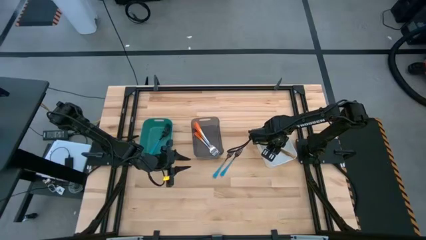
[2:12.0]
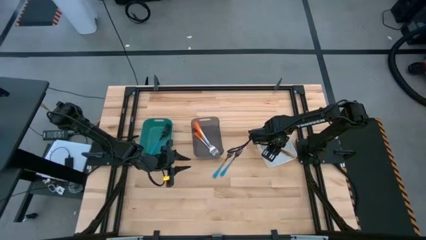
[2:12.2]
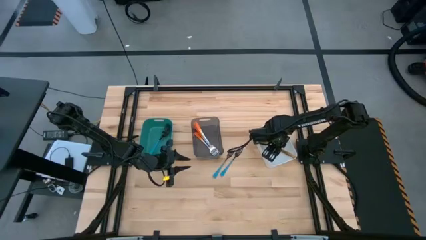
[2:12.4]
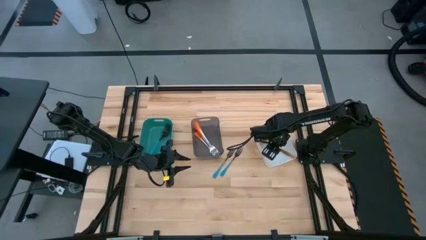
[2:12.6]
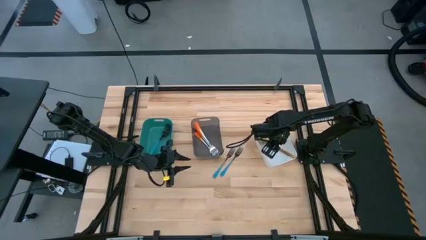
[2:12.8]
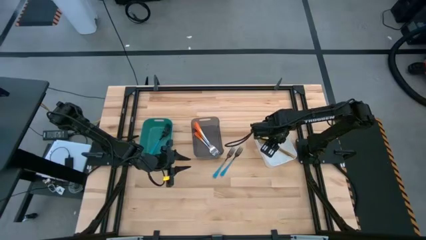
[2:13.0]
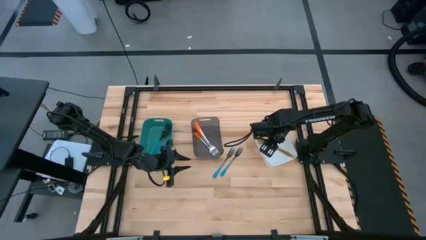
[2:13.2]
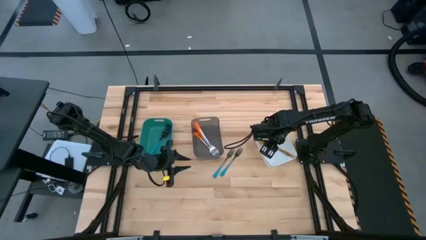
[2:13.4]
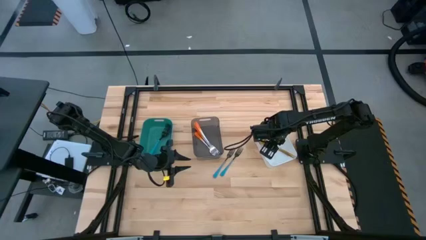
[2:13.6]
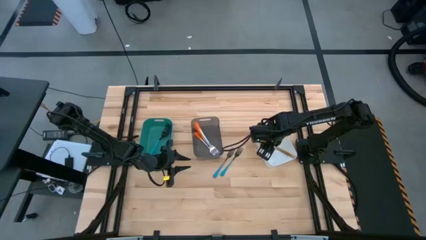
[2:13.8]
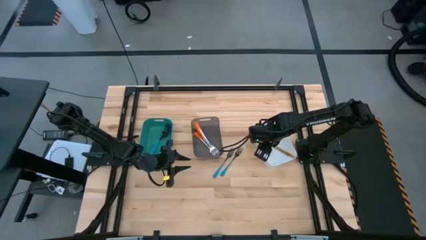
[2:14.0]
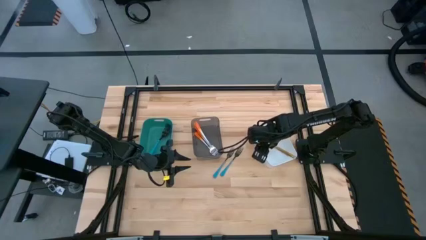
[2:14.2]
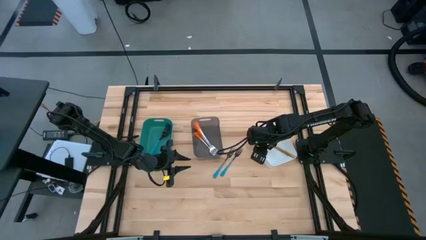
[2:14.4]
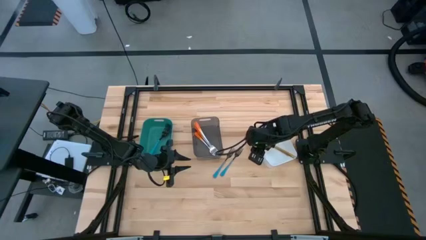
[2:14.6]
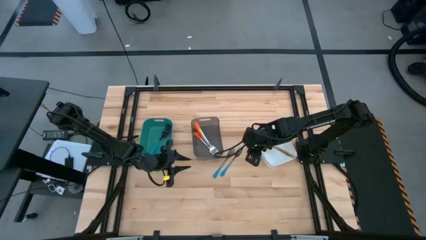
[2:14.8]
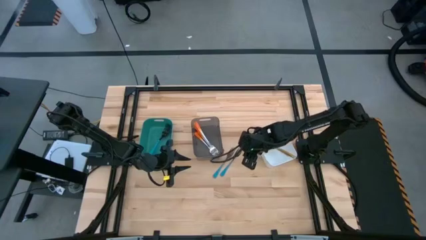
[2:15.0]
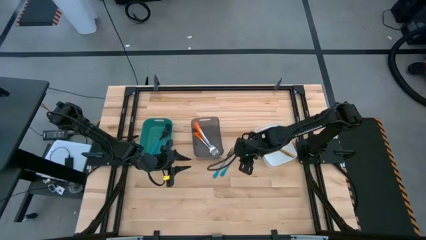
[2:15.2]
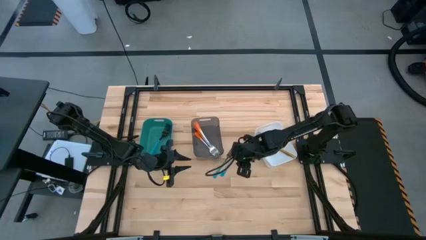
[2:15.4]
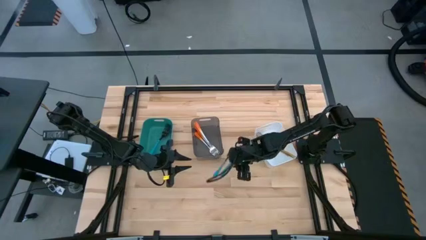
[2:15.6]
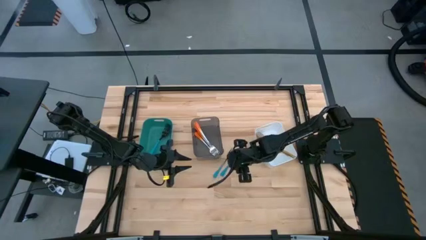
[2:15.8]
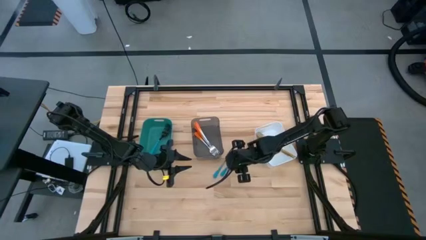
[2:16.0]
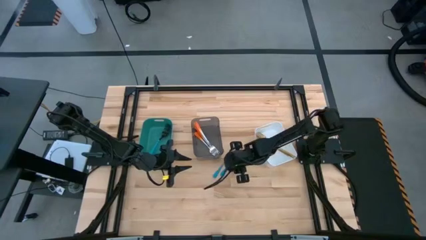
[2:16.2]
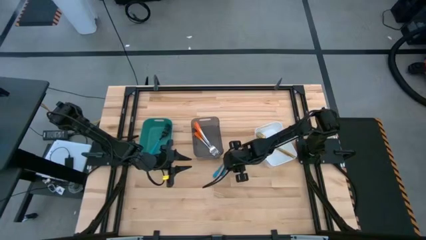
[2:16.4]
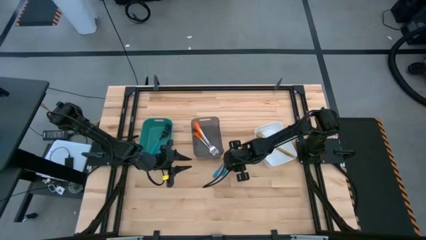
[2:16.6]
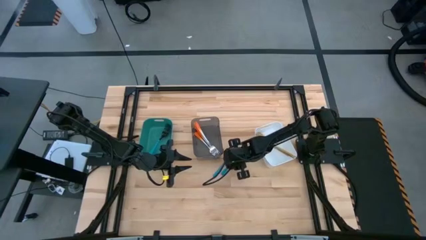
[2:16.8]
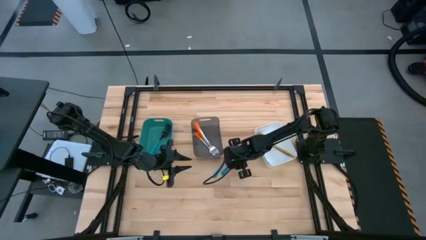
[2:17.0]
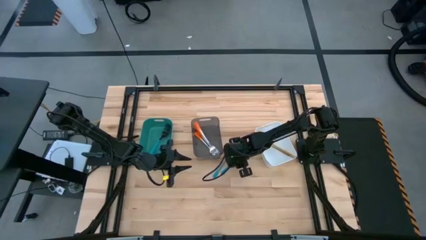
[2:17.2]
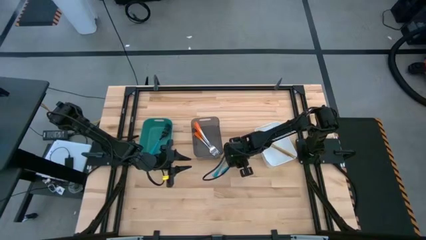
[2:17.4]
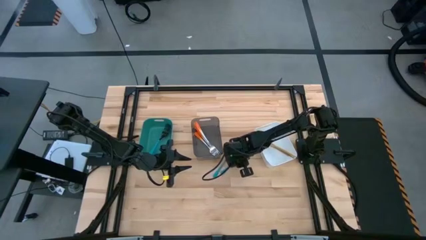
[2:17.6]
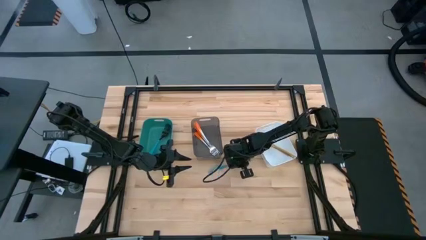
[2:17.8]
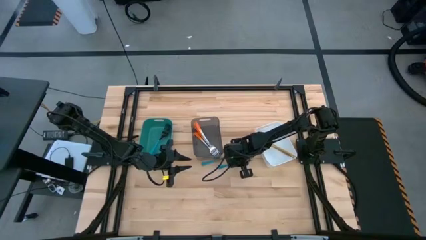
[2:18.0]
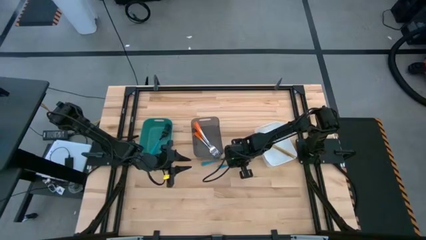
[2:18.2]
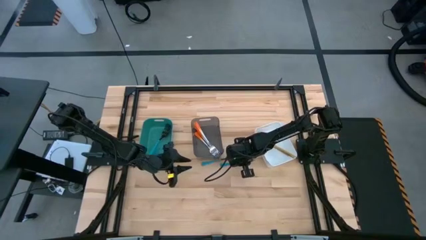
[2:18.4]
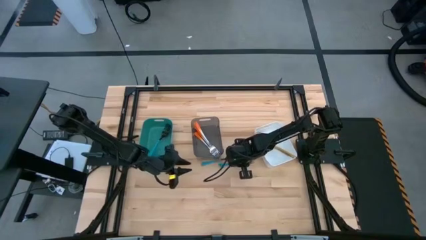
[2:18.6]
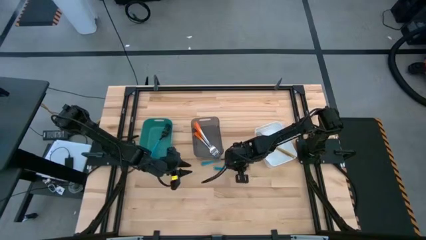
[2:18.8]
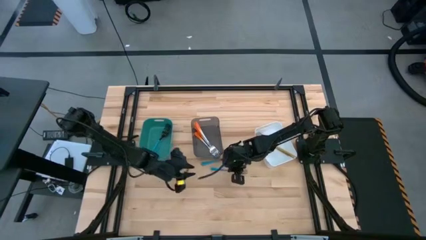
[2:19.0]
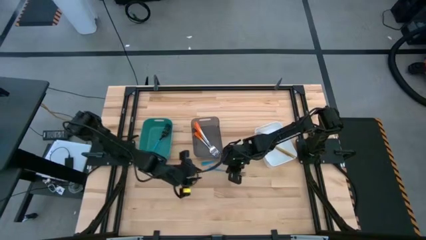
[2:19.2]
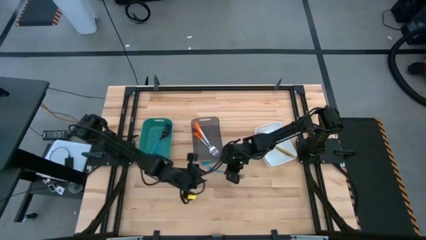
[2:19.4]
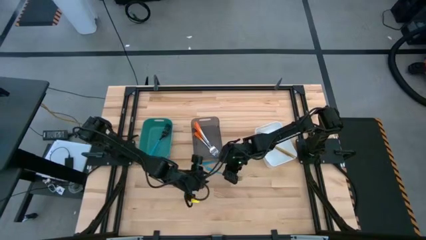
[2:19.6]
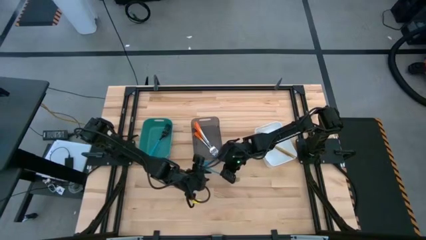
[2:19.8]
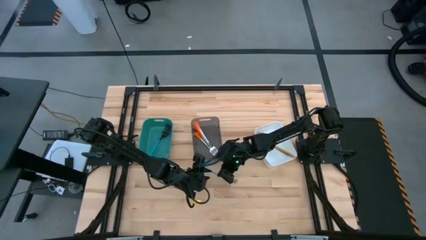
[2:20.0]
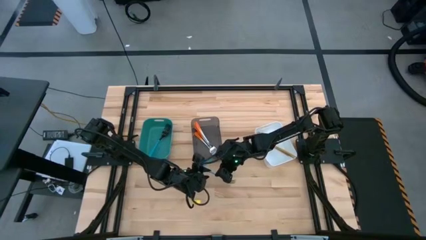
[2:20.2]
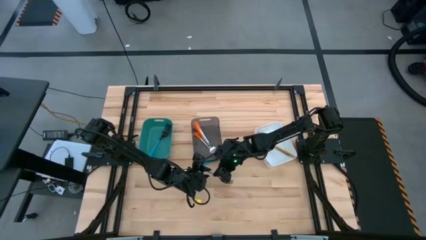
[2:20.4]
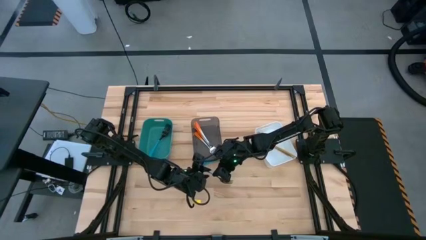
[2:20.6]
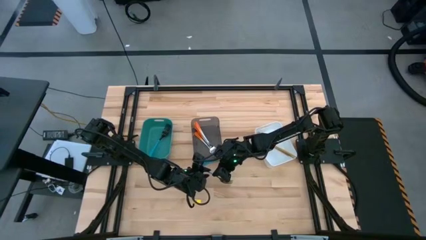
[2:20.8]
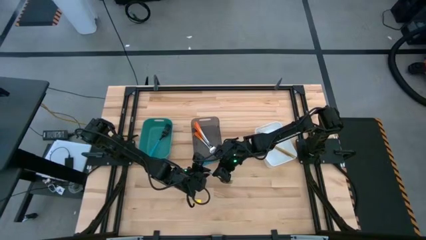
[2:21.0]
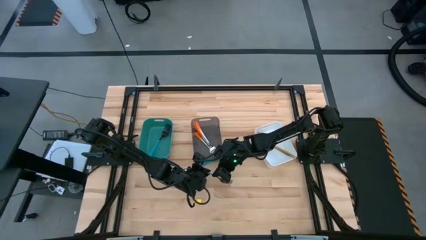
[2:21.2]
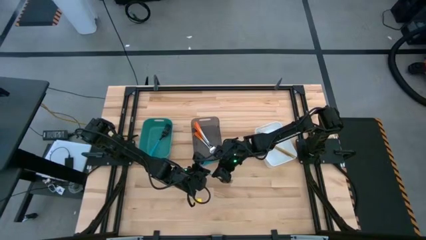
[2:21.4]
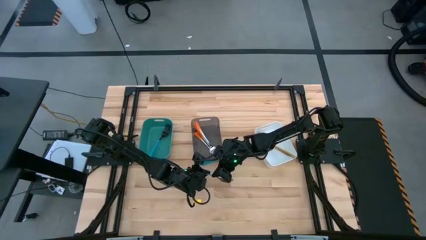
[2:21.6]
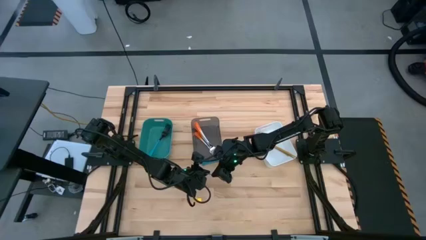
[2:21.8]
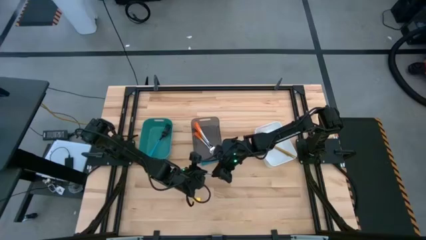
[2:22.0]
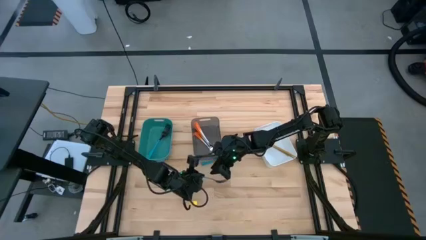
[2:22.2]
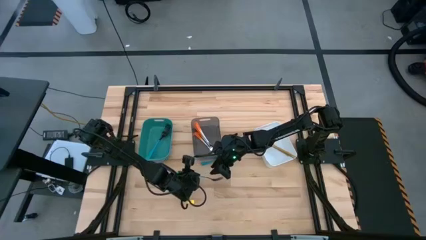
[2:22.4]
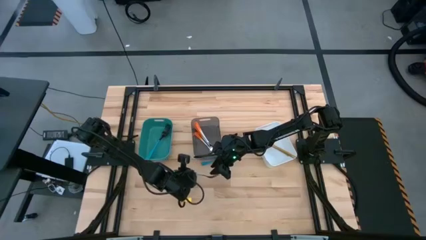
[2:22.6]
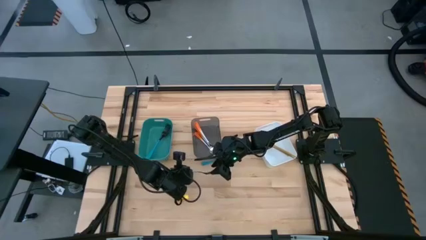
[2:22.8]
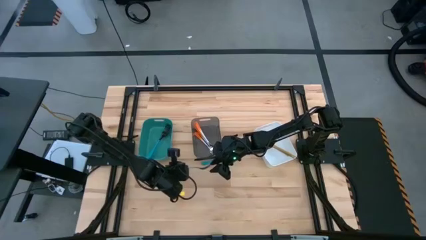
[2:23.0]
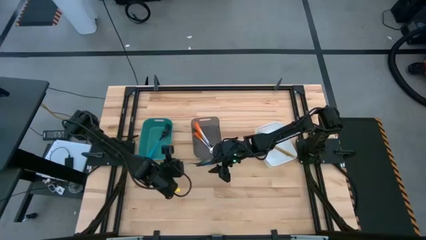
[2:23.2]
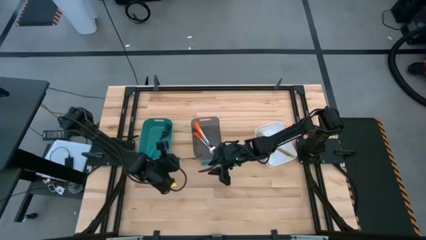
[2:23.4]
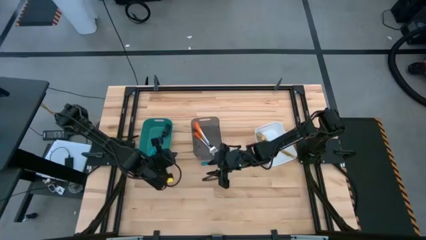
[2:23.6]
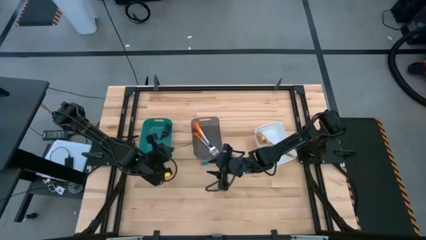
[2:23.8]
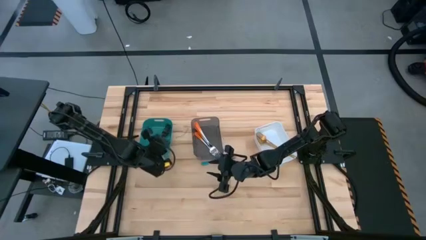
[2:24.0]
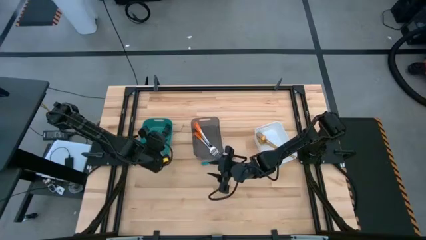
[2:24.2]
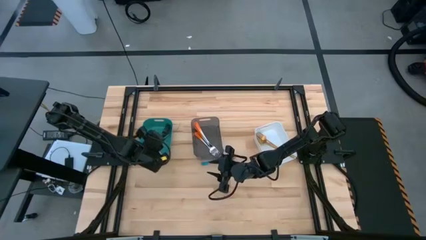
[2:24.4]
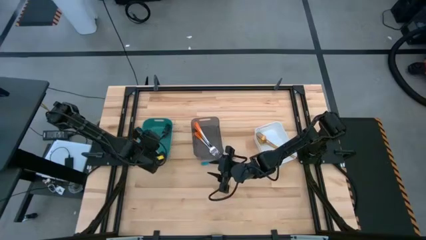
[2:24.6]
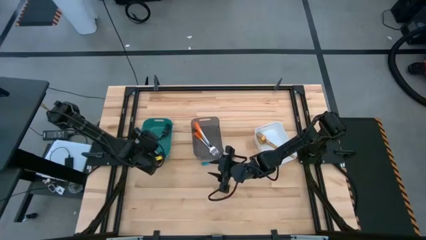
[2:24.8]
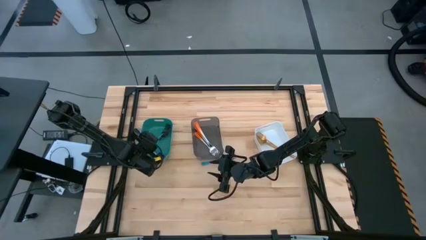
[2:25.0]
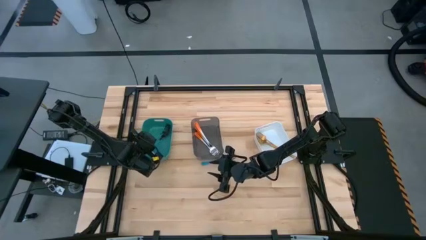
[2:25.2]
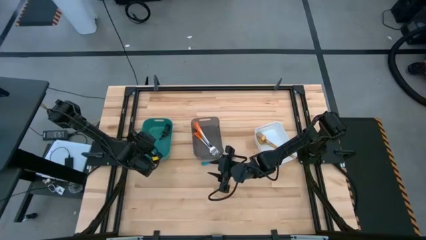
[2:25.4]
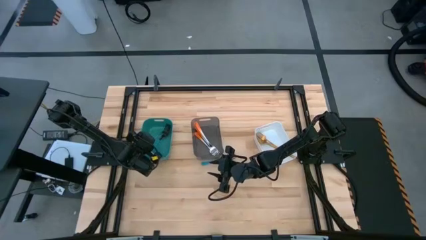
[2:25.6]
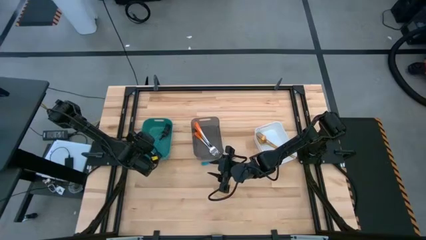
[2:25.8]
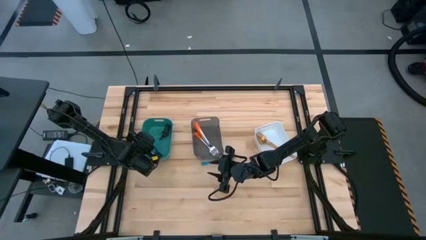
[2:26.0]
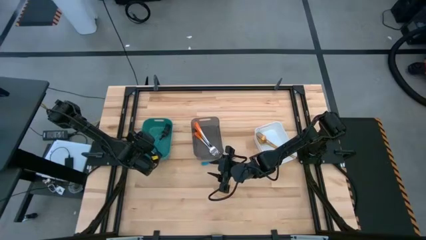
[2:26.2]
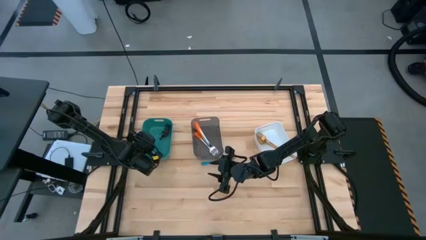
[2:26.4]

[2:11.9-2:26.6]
Task: Sort silverware by color (type)
Put the blue fork into the green bin

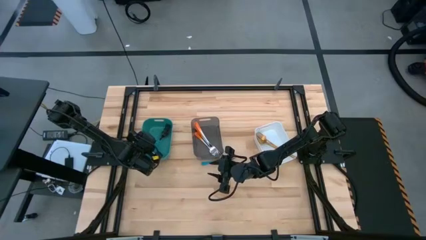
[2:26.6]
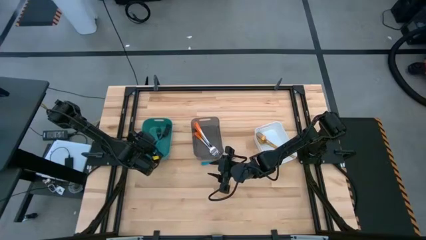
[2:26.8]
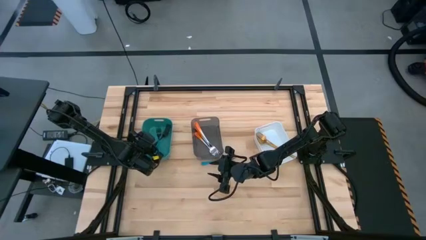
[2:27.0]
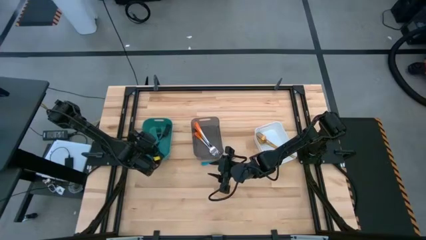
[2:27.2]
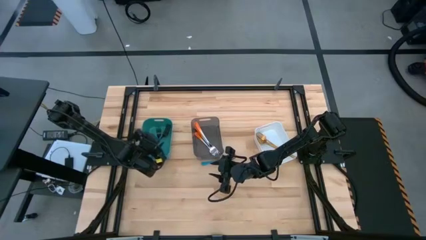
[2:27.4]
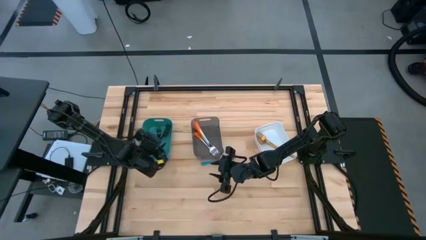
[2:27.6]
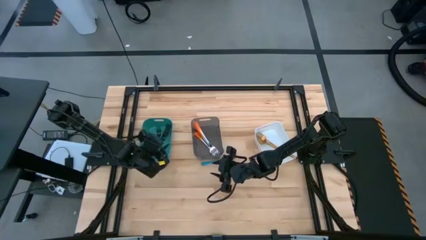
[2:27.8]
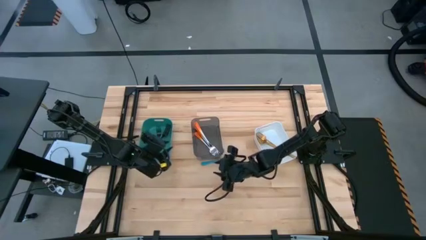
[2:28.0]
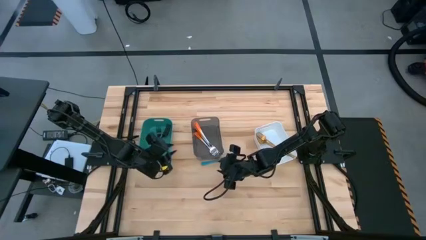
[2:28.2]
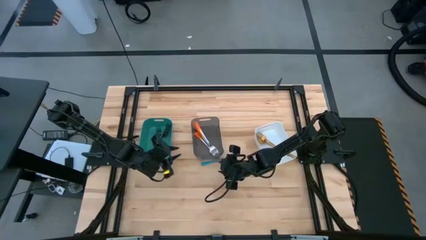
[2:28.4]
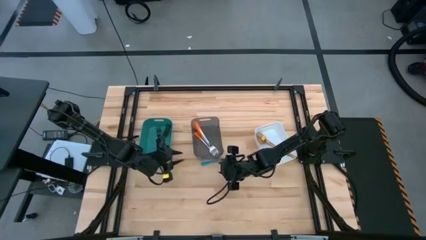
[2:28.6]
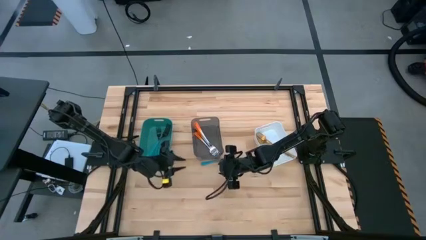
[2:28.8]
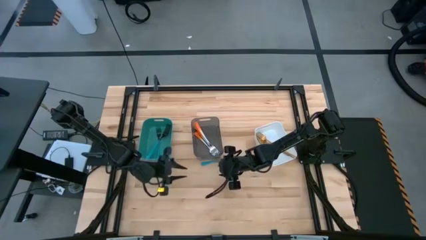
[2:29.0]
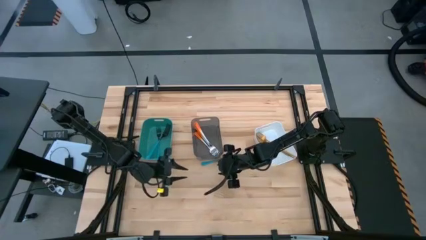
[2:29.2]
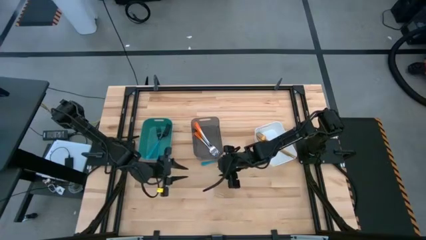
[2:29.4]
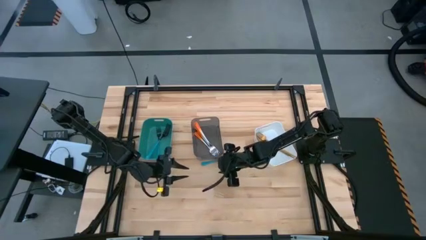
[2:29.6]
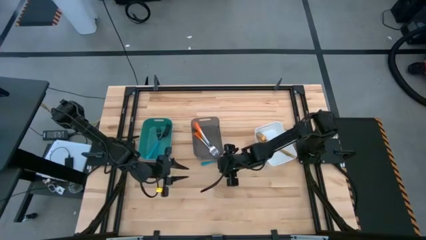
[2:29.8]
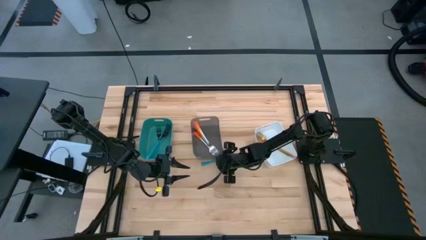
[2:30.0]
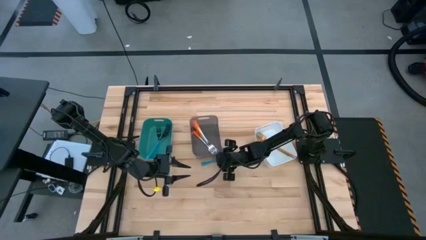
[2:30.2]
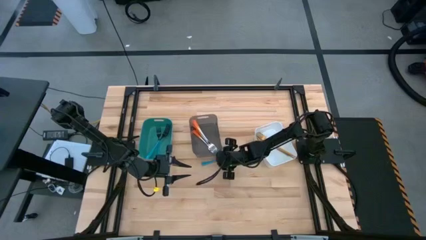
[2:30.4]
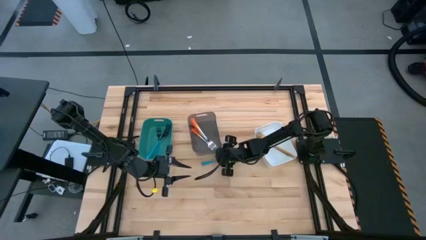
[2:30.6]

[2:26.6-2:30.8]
Adjust the black bin
